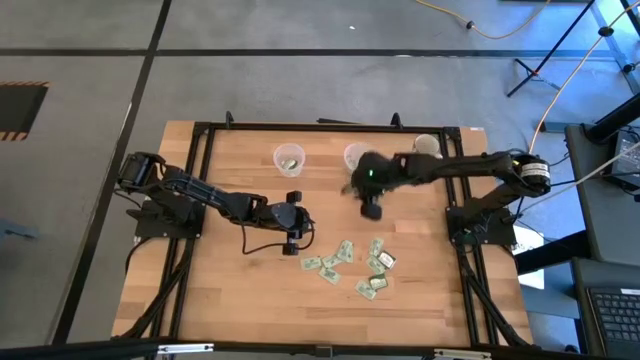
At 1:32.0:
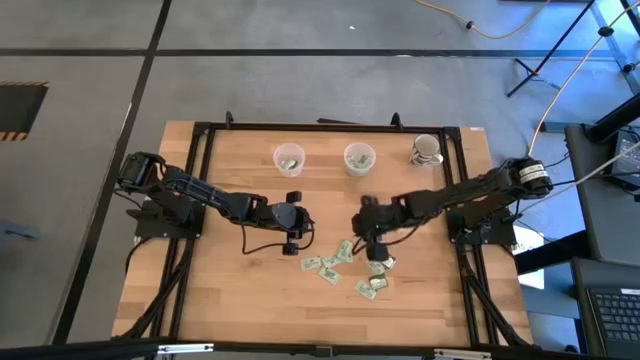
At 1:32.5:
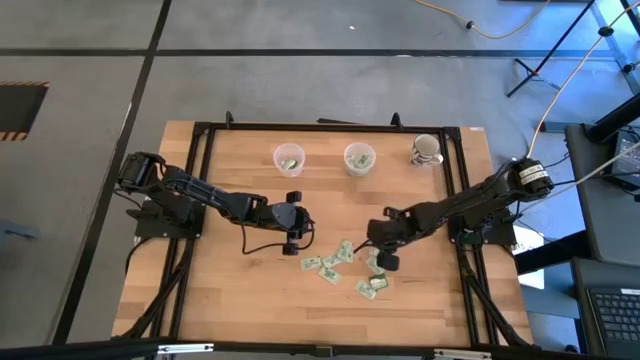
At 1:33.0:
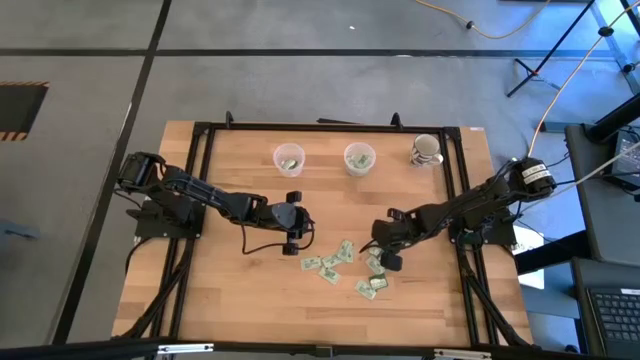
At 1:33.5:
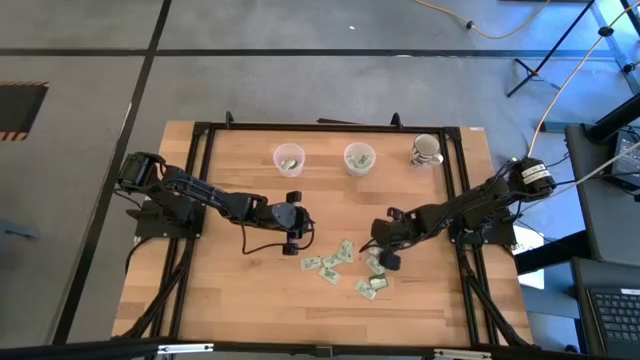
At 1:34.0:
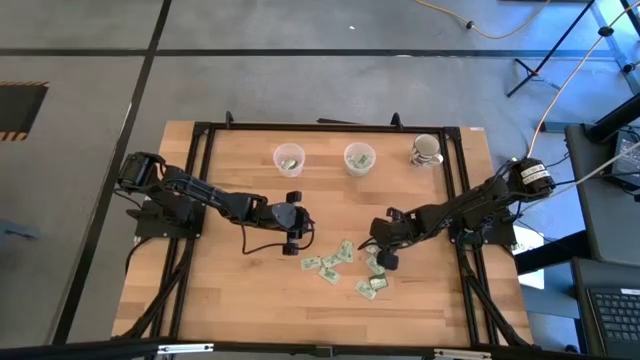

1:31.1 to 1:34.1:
Task: Pick and place Stevia / Truvia into bins
Put the stevia packet into the right transparent container

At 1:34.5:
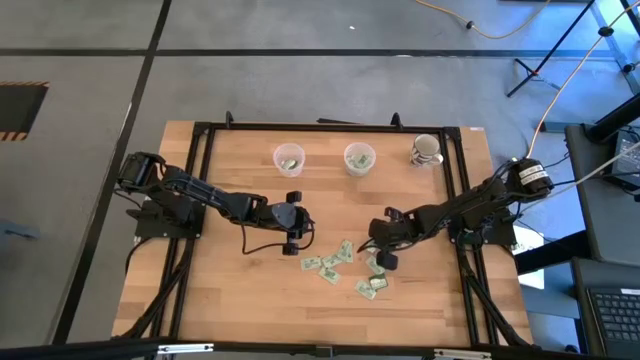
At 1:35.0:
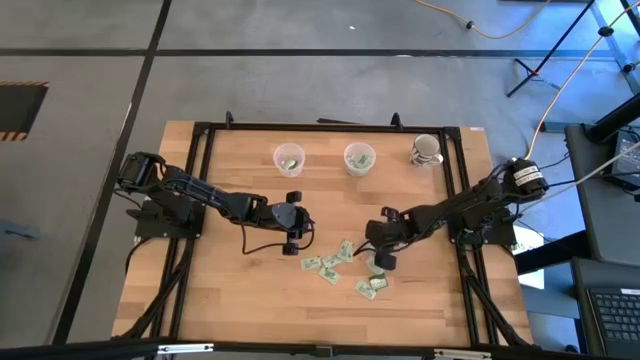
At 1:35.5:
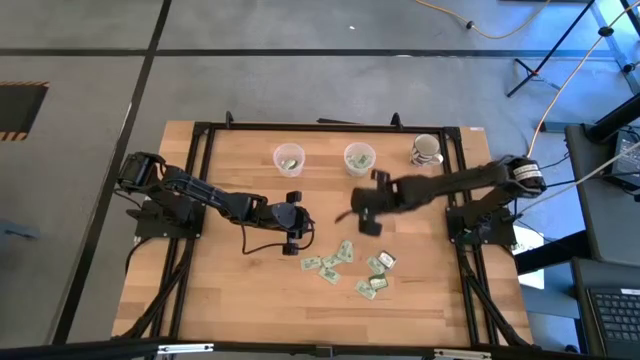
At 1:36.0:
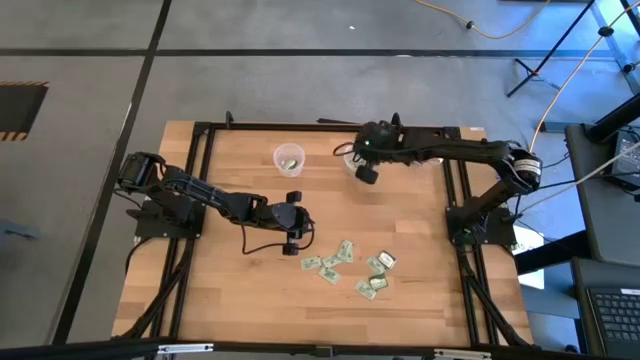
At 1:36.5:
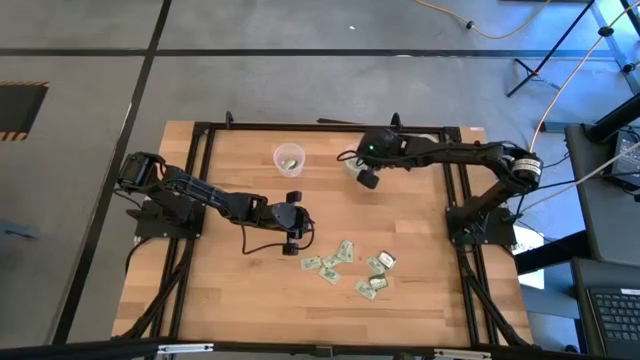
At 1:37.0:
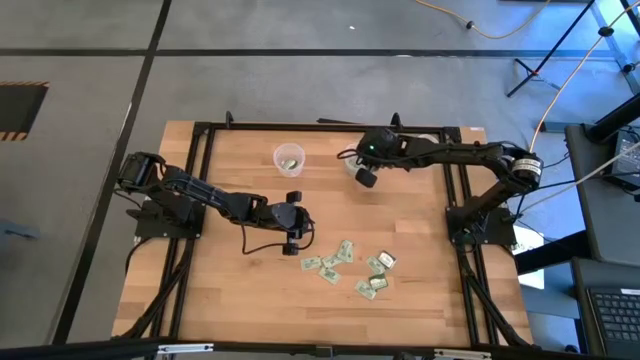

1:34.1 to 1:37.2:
Put the stevia packet into the right transparent container

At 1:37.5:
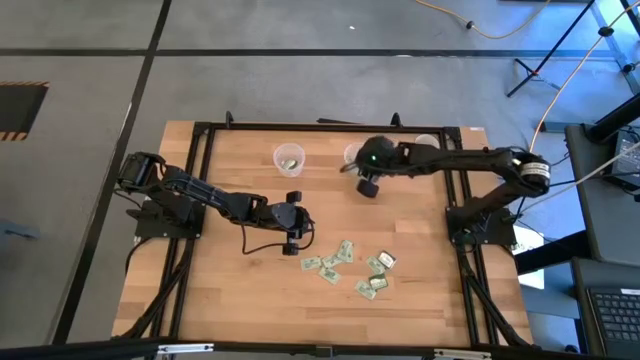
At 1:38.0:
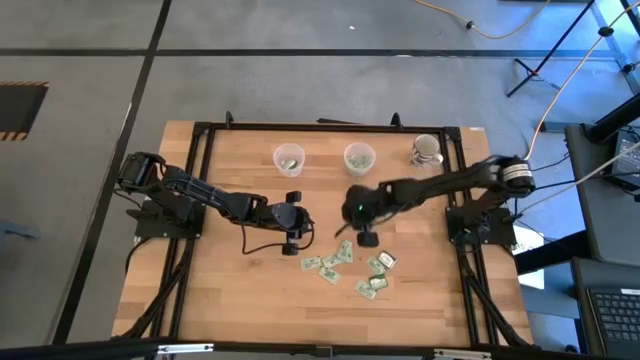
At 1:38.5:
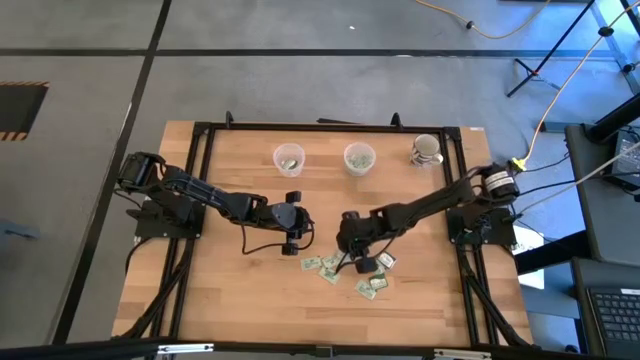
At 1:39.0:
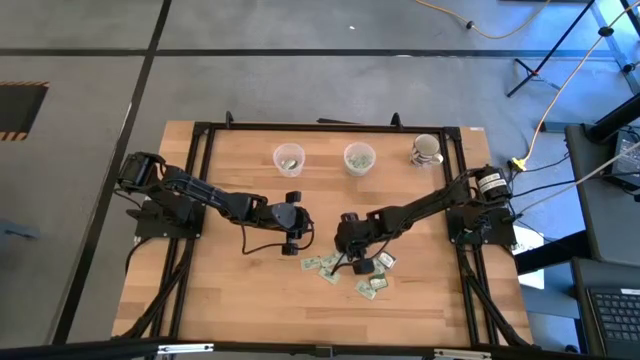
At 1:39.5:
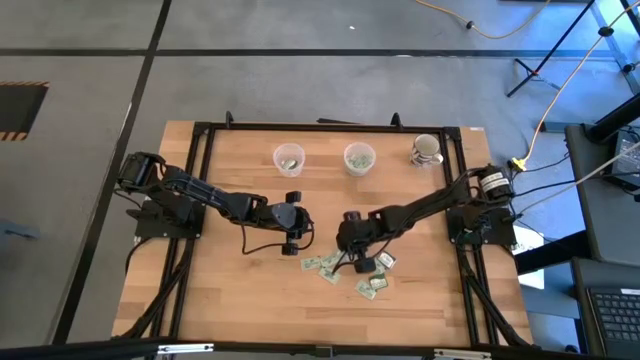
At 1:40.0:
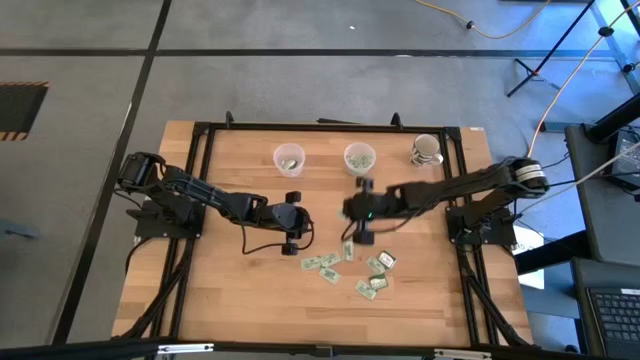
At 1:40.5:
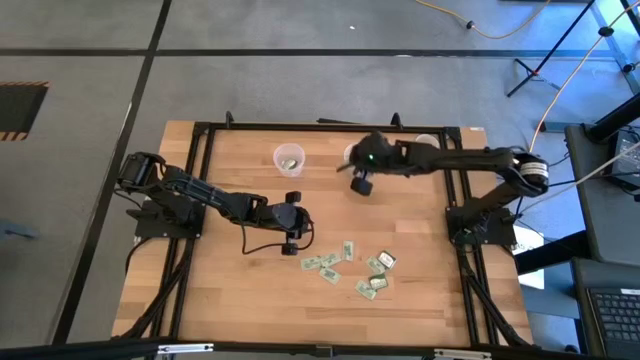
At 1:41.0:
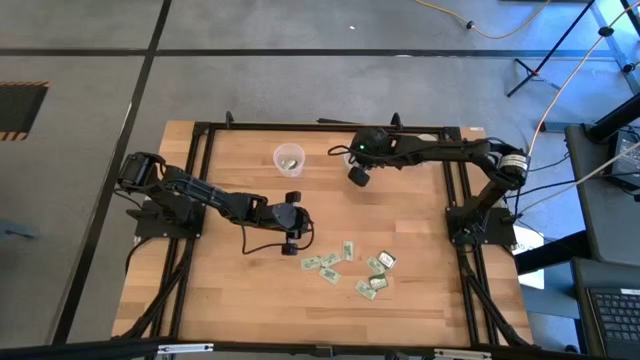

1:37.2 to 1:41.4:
Put the stevia packet into the right transparent container

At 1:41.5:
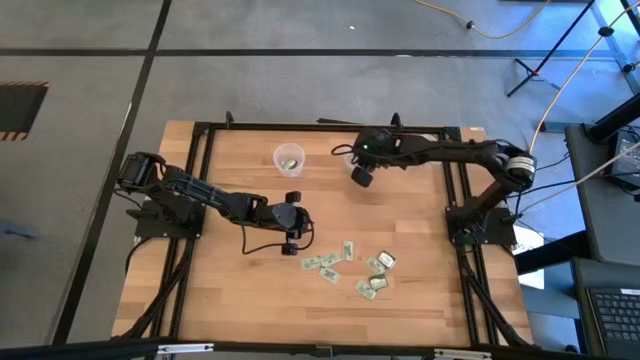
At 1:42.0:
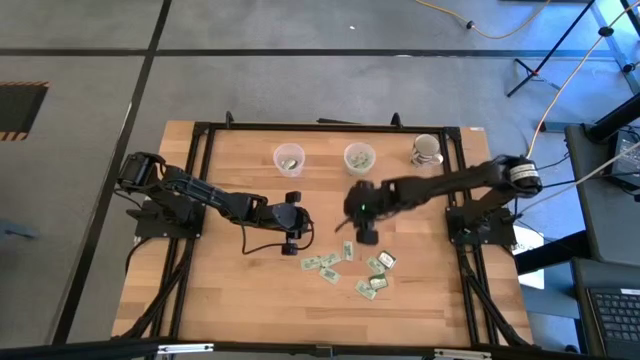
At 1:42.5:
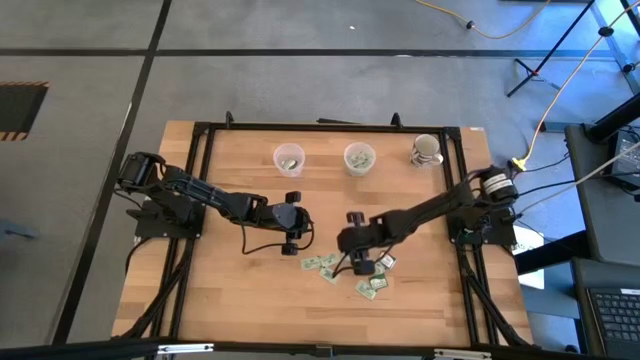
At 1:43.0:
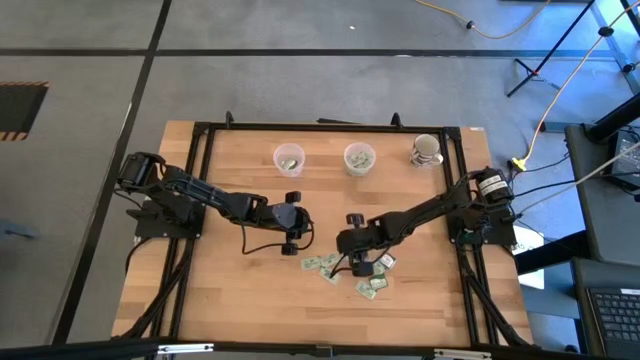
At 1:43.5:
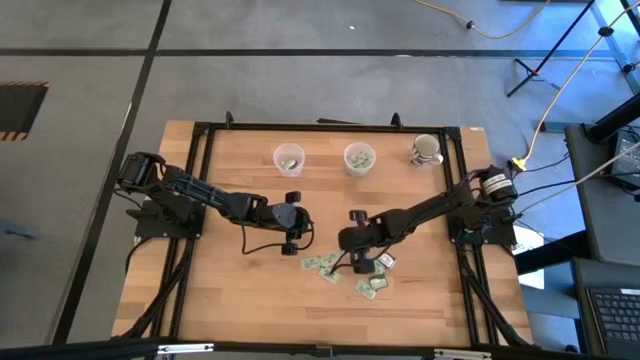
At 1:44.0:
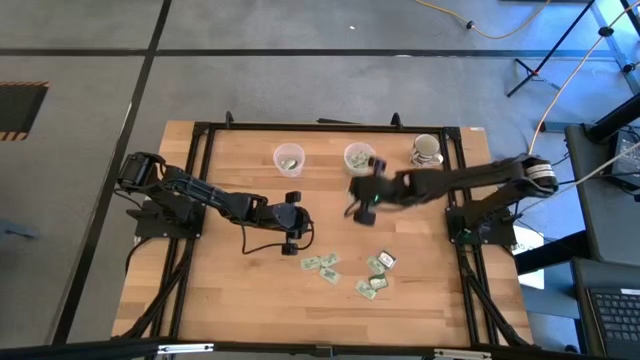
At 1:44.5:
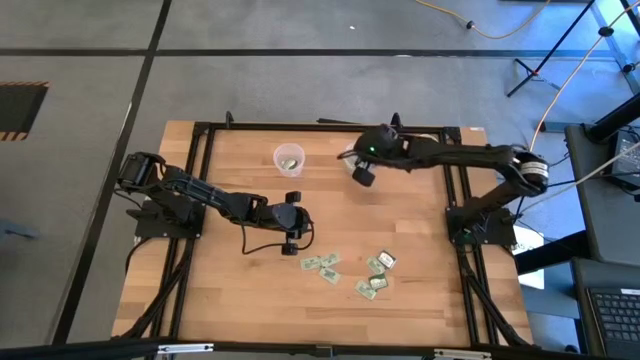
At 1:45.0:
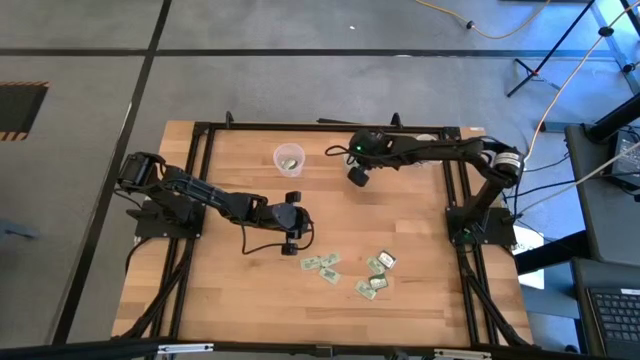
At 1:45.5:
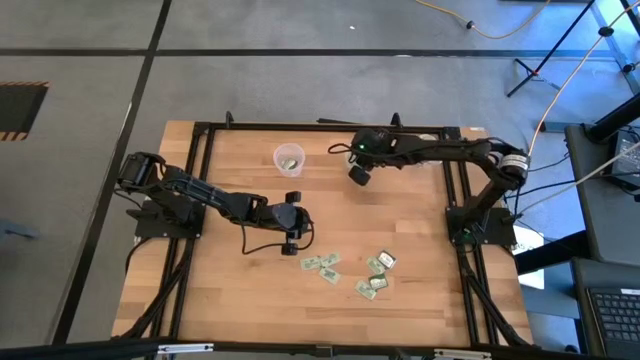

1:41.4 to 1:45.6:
Put the stevia packet into the right transparent container

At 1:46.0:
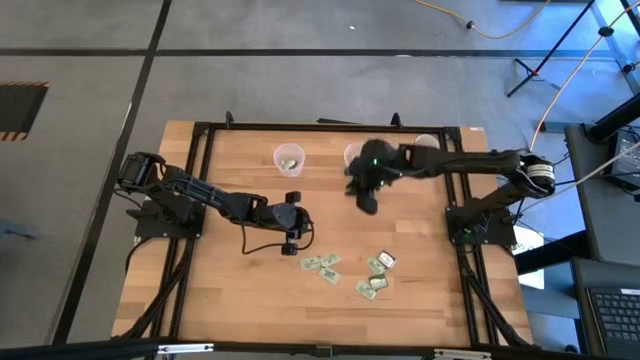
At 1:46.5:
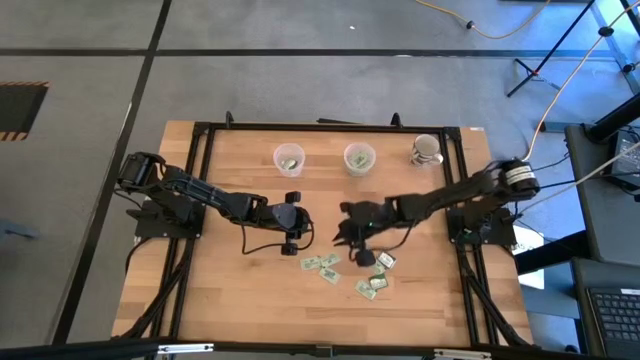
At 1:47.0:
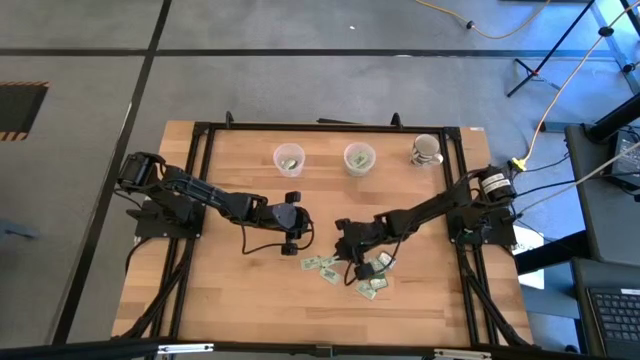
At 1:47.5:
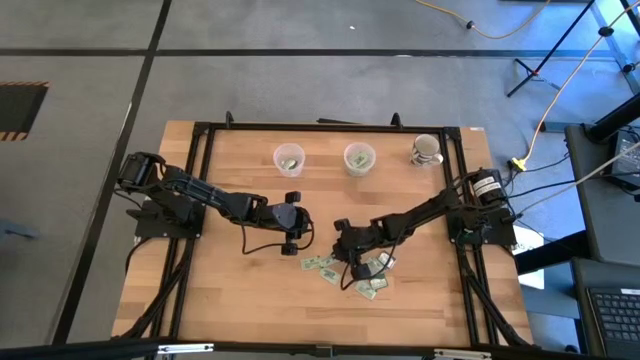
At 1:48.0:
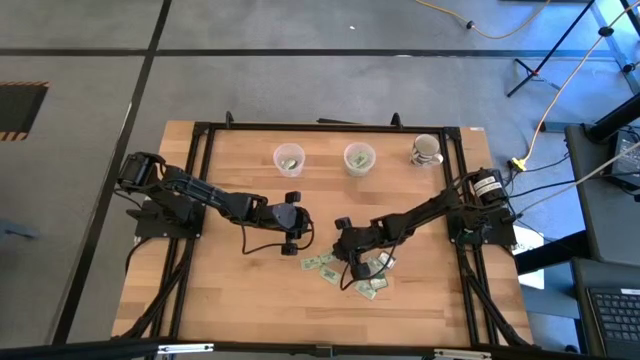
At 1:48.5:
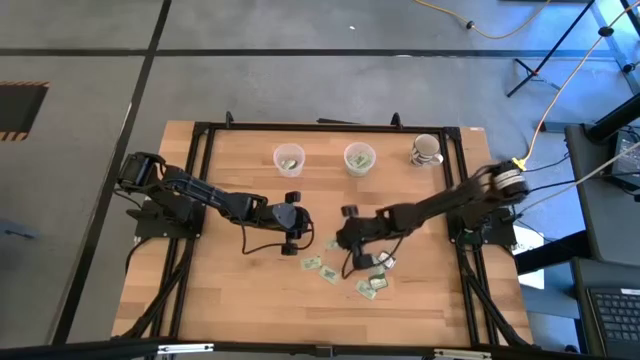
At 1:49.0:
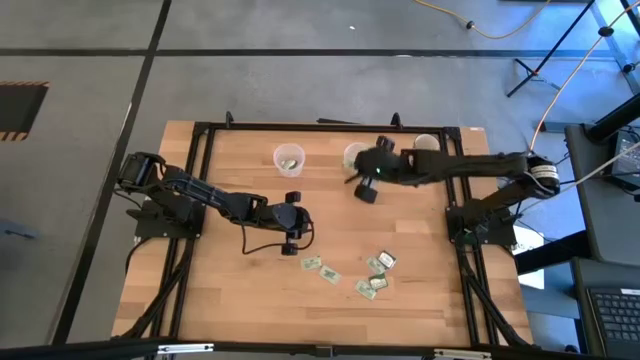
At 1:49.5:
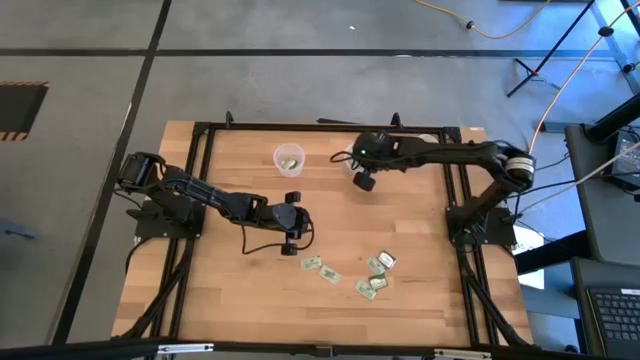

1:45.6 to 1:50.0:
Put the stevia packet into the right transparent container

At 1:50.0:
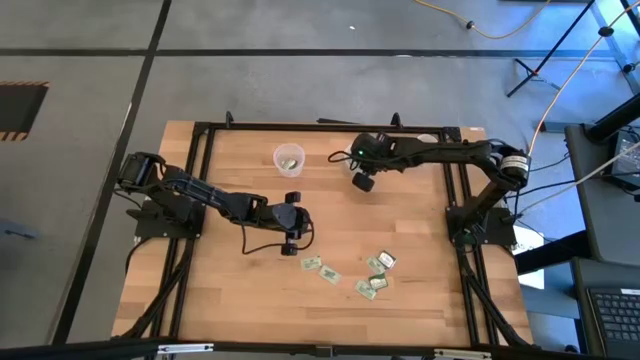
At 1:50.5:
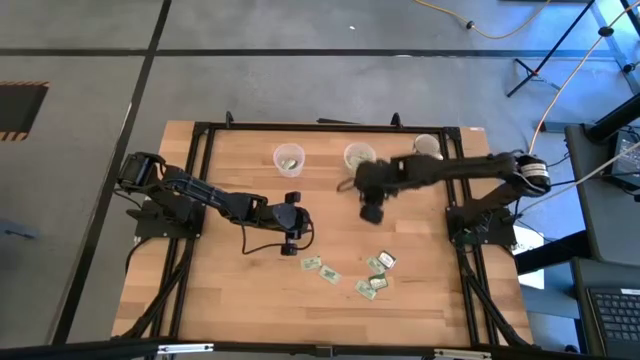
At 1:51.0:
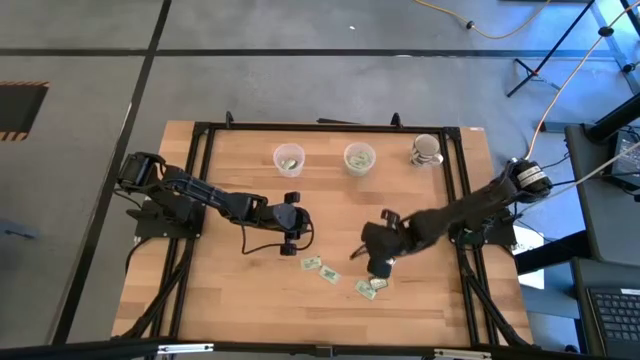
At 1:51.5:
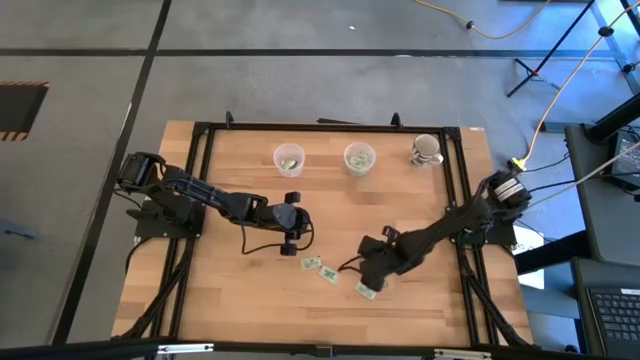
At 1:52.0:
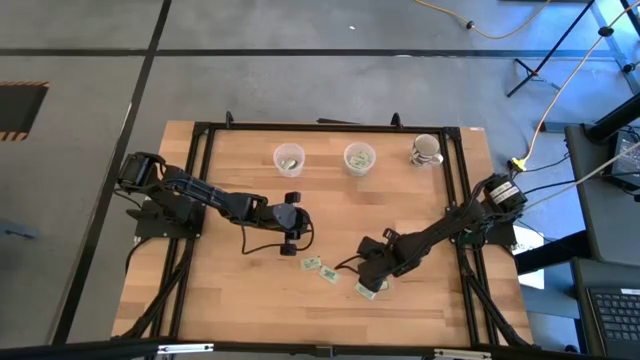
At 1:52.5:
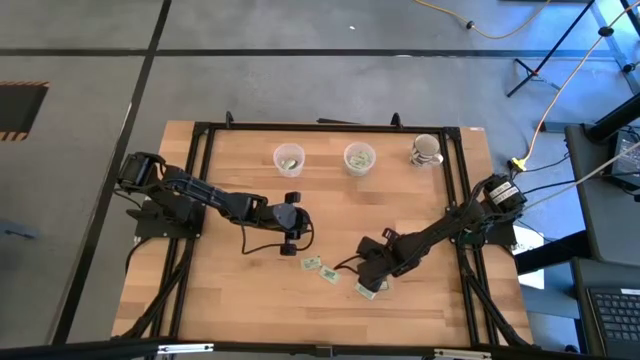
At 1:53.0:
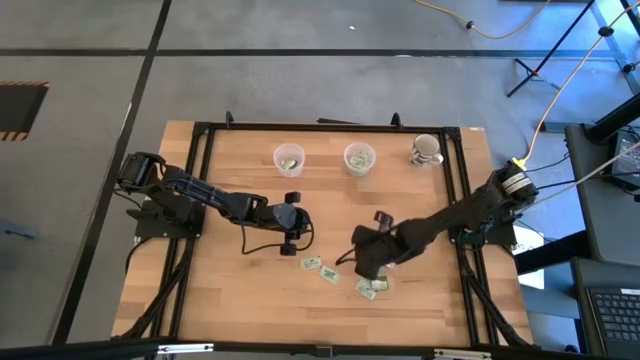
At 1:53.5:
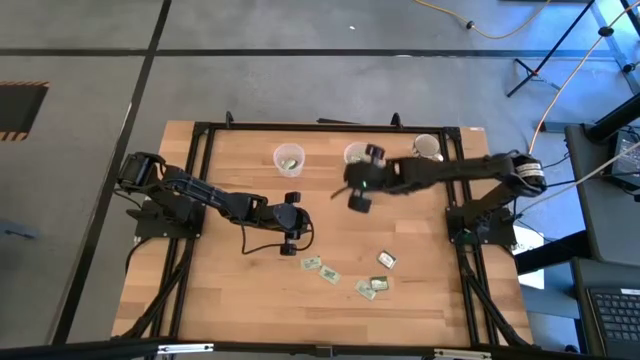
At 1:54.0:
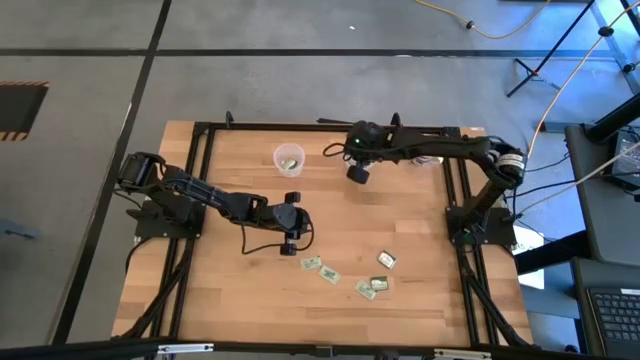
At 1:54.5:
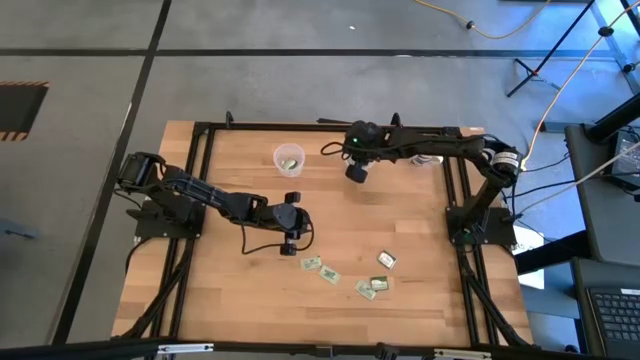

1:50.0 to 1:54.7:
Put the stevia packet into the right transparent container
